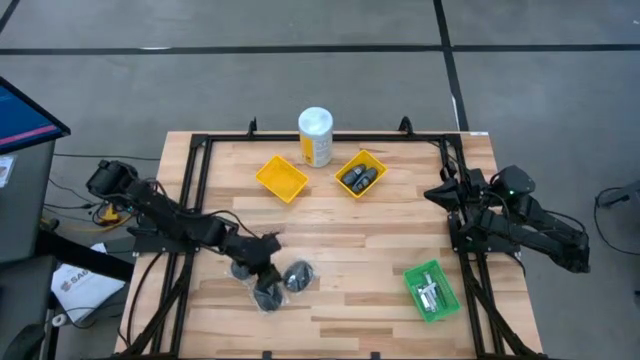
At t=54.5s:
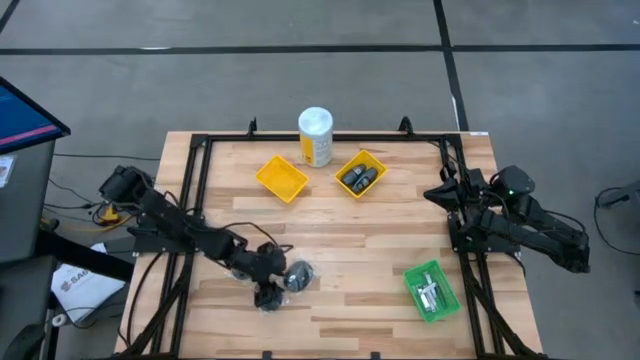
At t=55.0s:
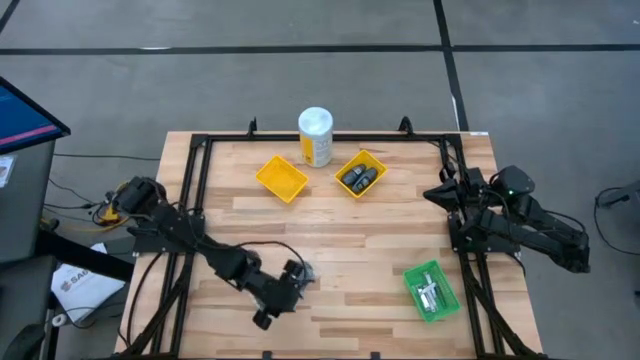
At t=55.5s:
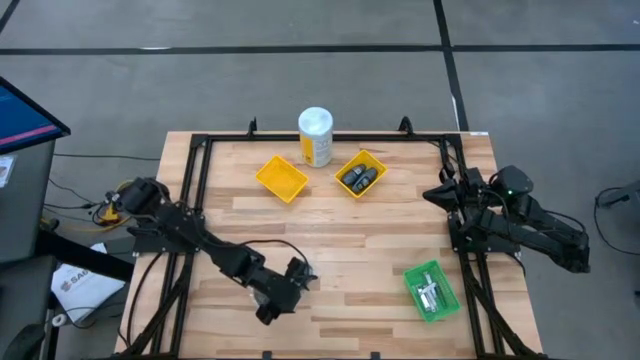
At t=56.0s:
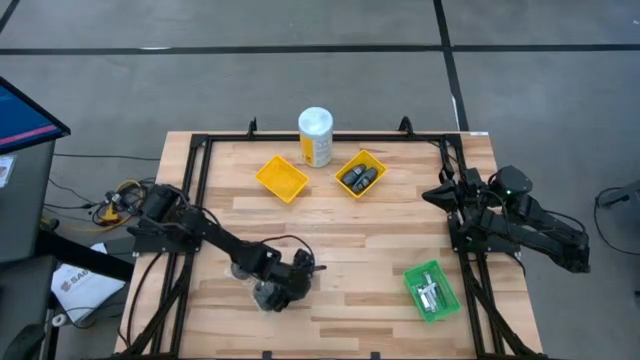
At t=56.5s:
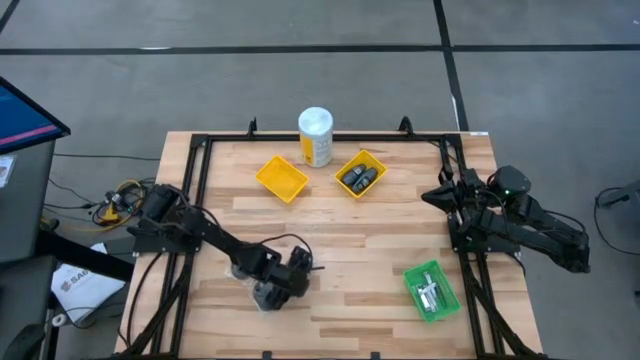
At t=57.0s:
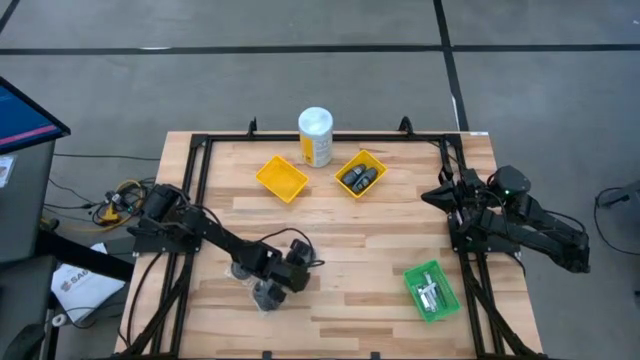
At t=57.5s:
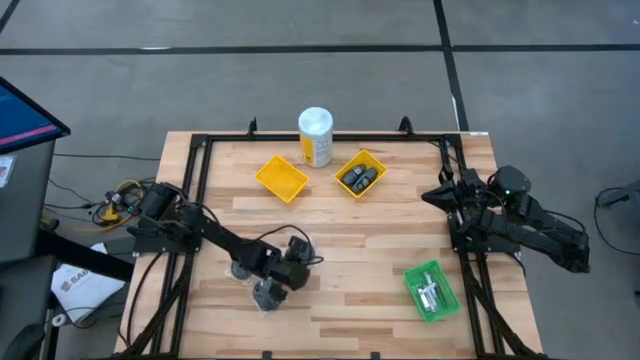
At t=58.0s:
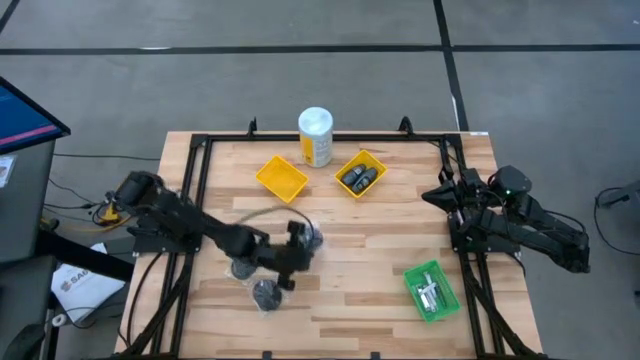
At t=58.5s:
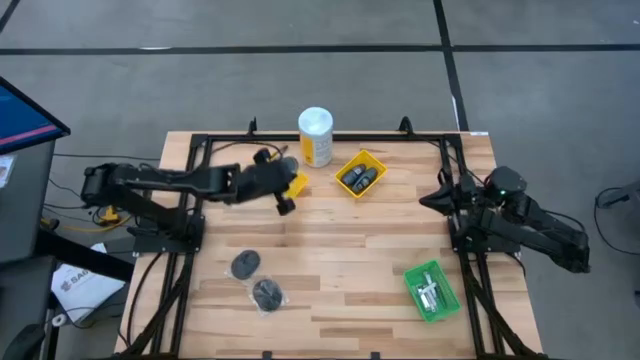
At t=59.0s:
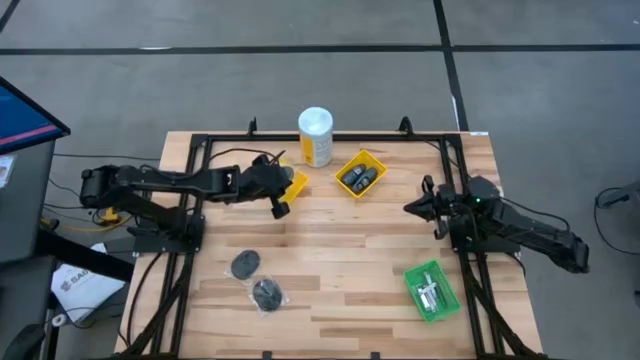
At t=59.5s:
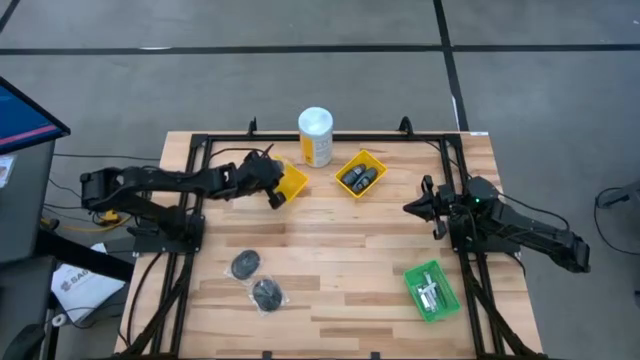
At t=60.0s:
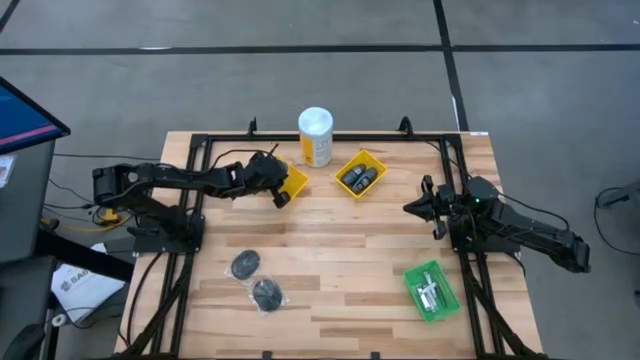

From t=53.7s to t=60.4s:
Task: Pick & Place Travel size toiletries
Put the black hairbrush into the left yellow bin

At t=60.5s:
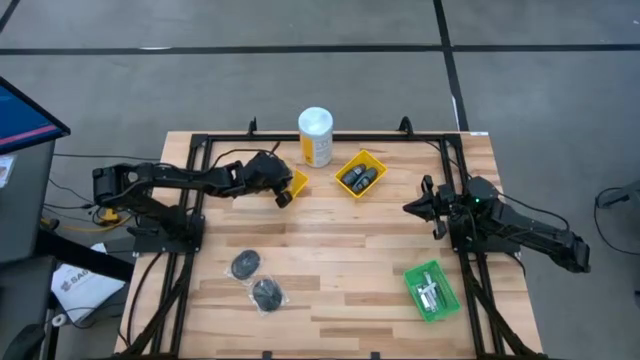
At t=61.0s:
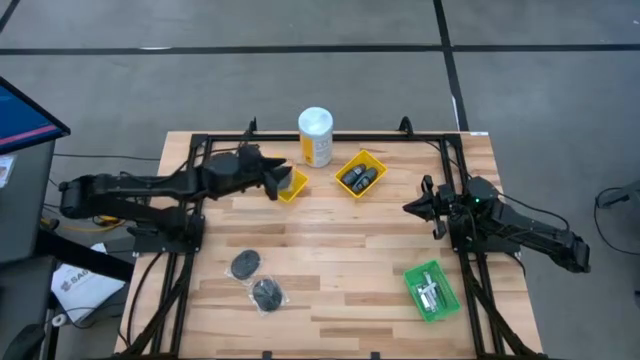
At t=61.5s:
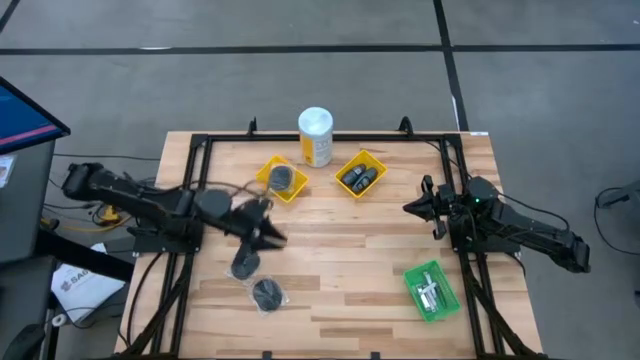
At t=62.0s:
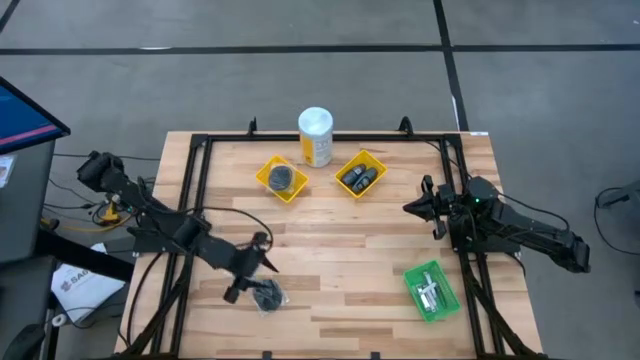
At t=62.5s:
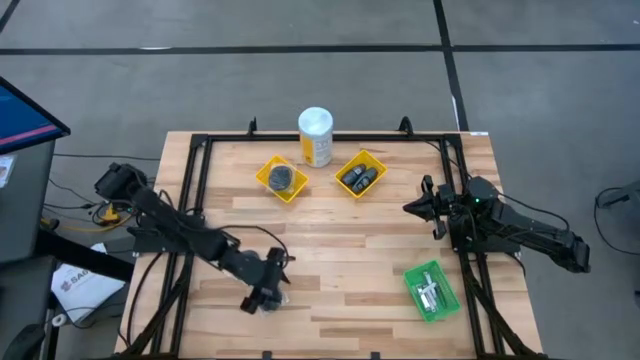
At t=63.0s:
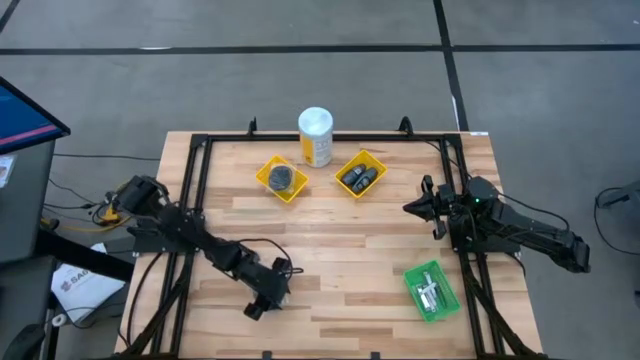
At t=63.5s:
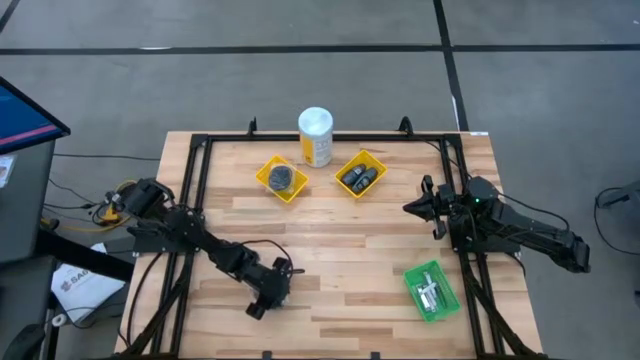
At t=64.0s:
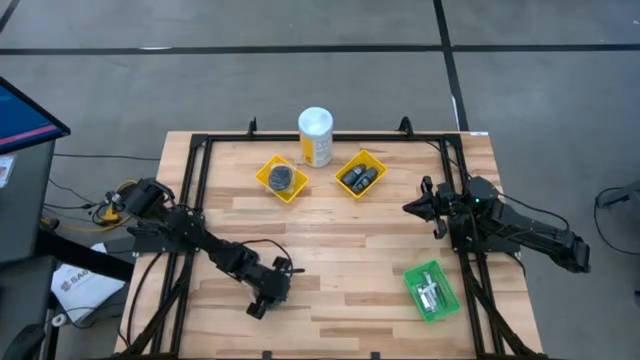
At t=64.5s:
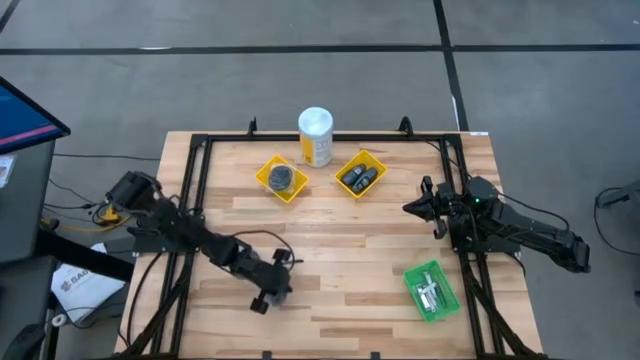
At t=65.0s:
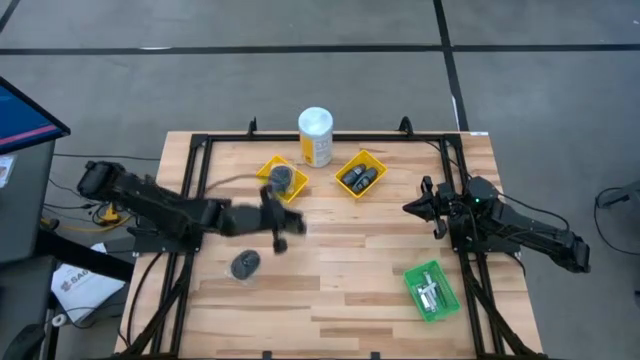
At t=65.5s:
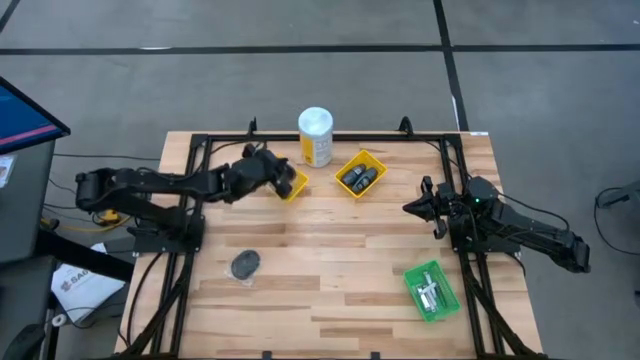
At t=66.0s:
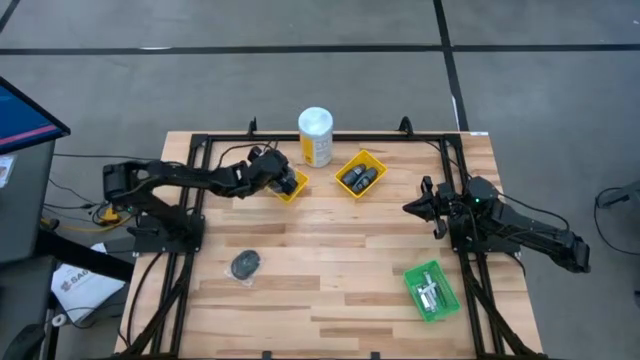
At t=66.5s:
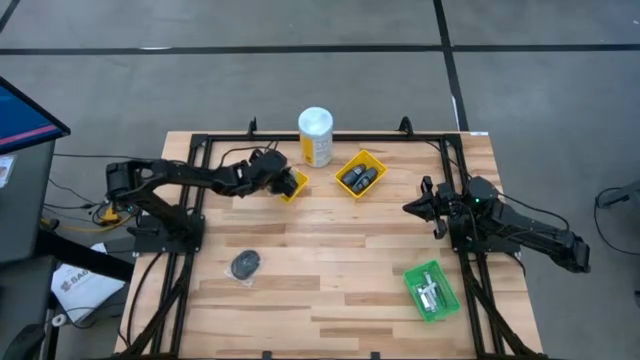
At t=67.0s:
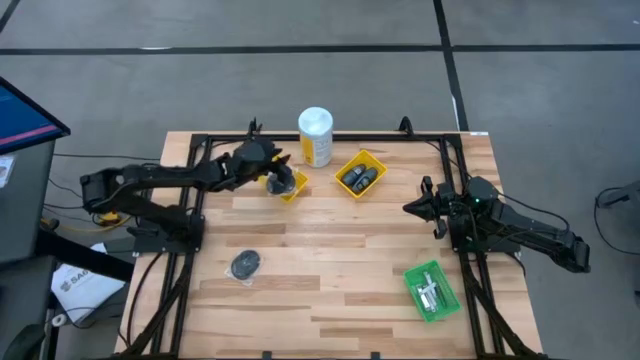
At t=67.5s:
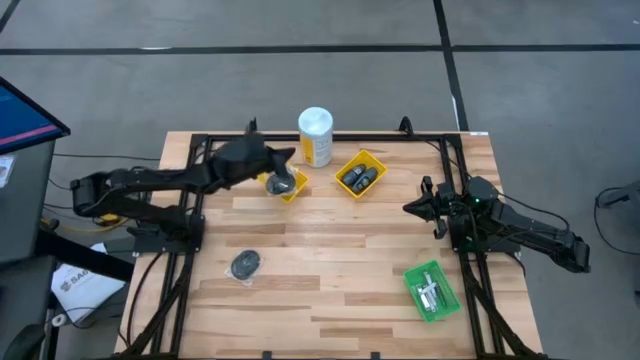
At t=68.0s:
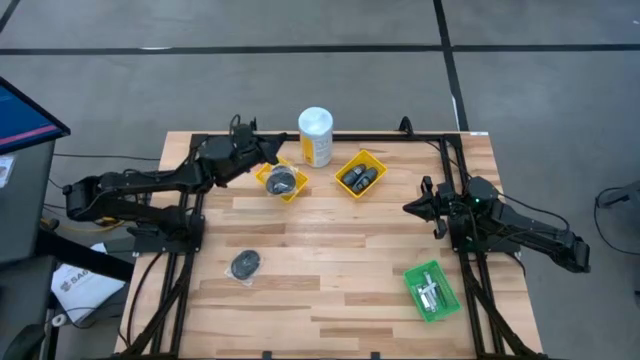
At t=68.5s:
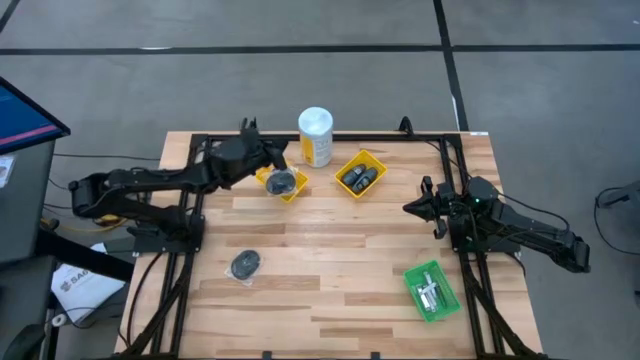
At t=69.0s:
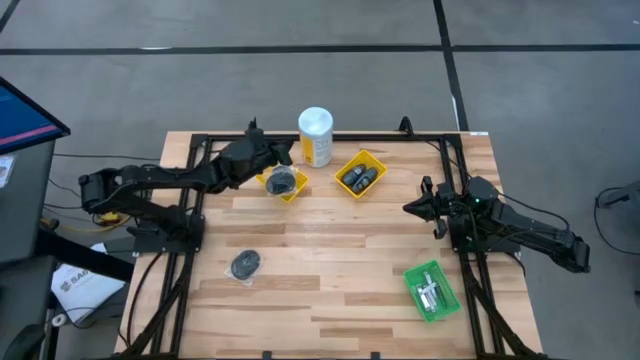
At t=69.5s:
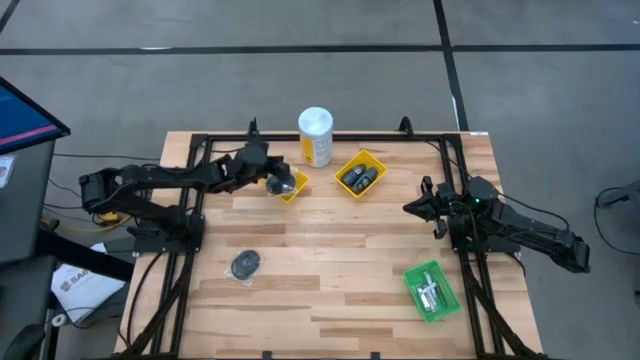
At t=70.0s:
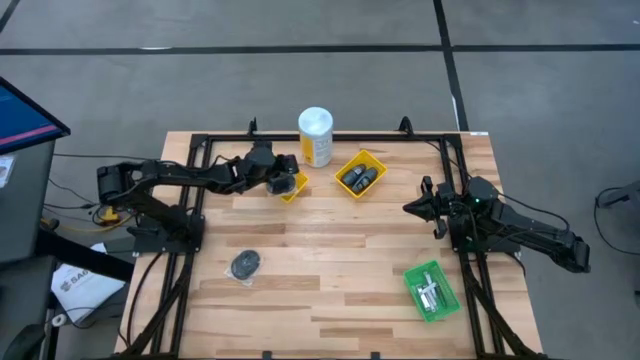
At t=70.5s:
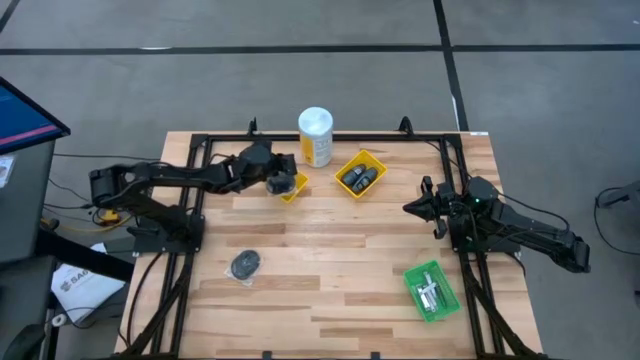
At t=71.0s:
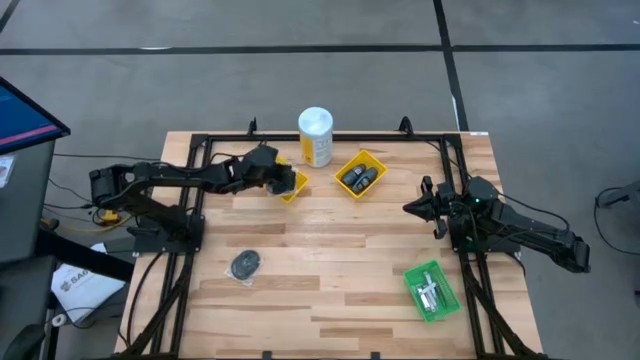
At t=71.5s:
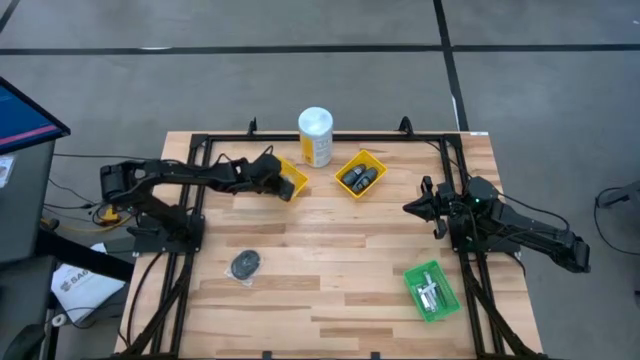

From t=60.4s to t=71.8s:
Put the black hairbrush into the left yellow bin

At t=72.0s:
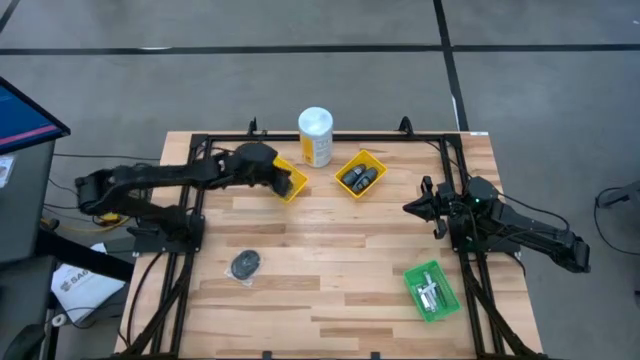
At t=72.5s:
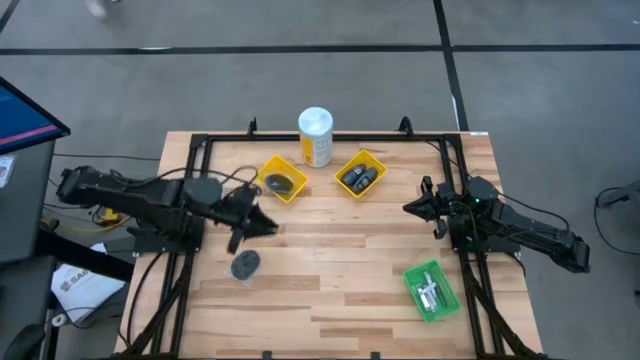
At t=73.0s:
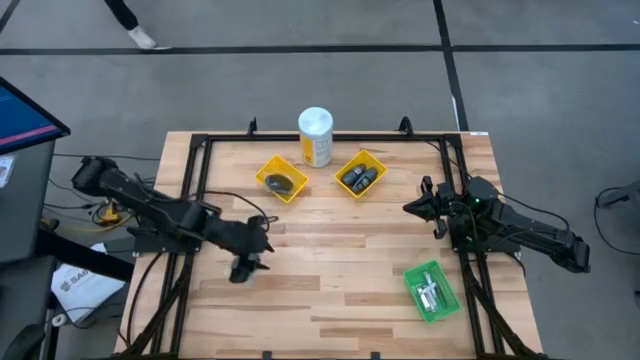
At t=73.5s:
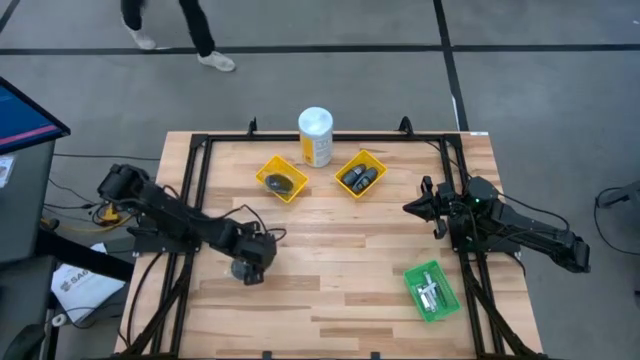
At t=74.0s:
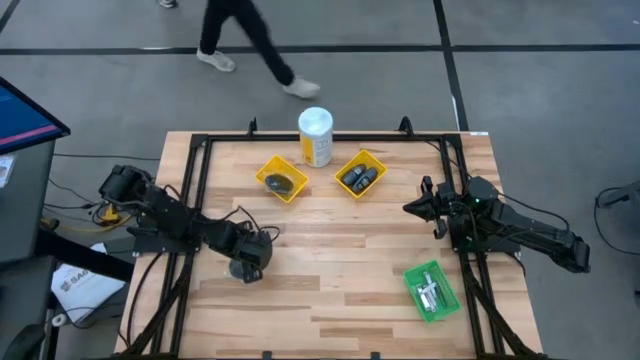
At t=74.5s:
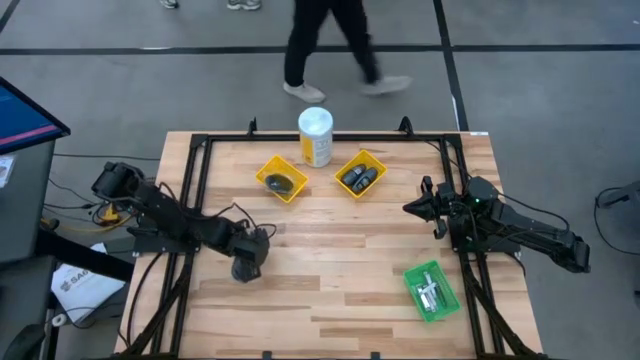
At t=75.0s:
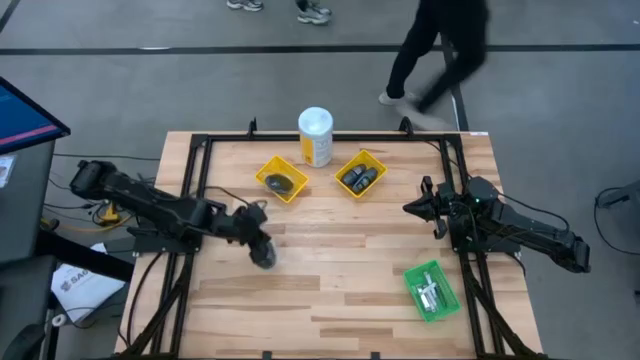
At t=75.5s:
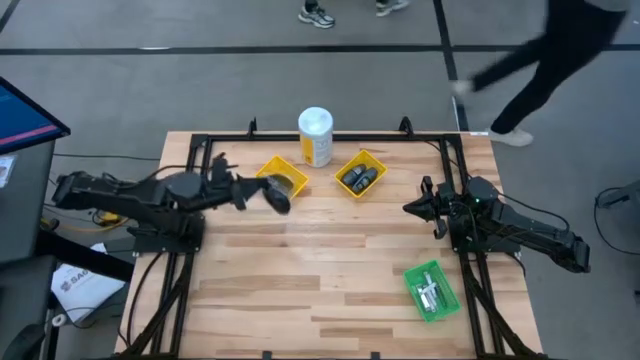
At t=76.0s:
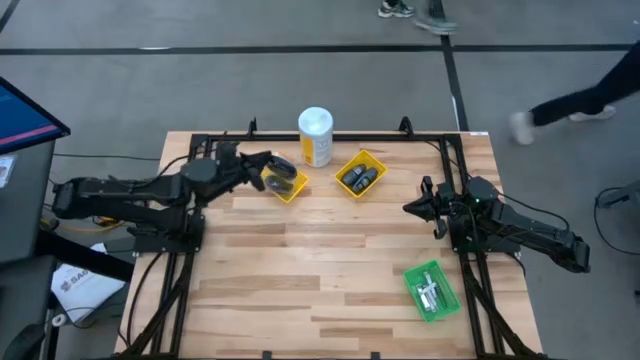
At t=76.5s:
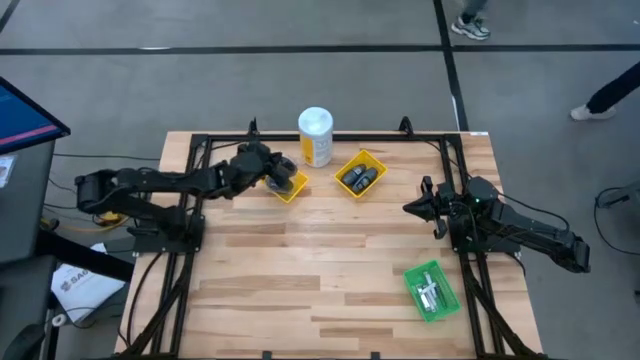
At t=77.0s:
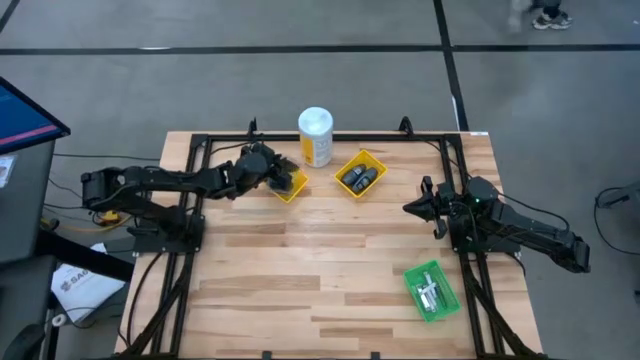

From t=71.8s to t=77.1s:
Put the black hairbrush into the left yellow bin
